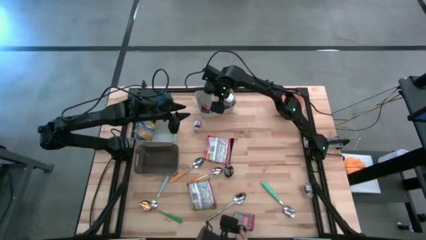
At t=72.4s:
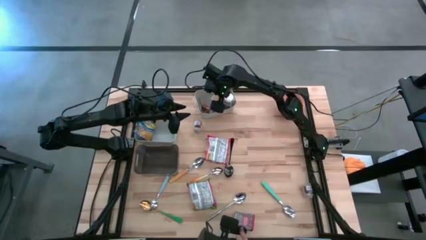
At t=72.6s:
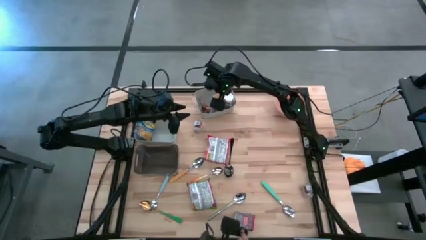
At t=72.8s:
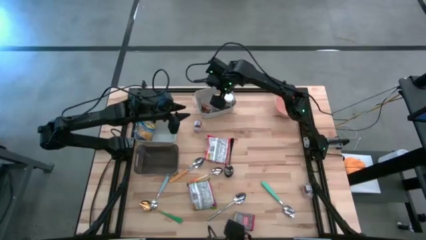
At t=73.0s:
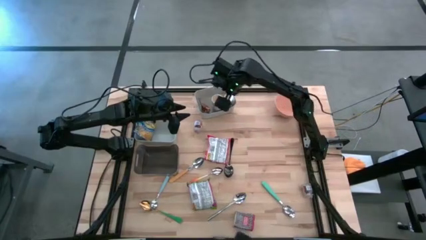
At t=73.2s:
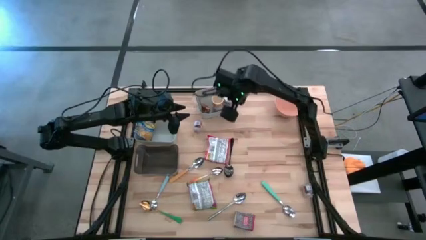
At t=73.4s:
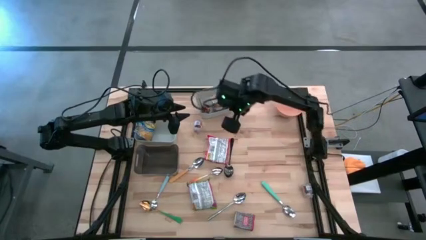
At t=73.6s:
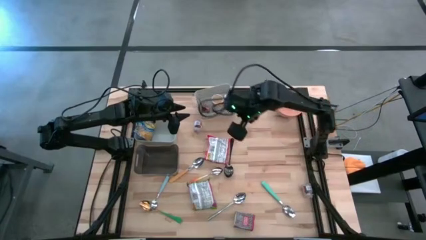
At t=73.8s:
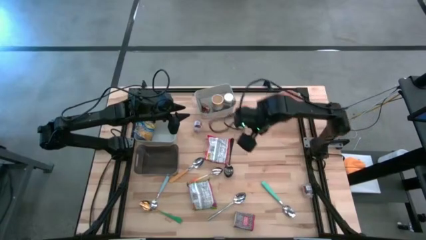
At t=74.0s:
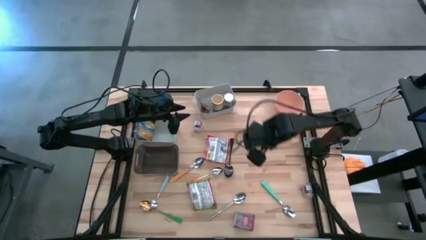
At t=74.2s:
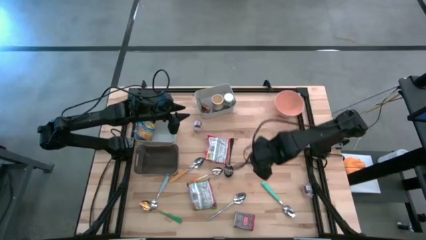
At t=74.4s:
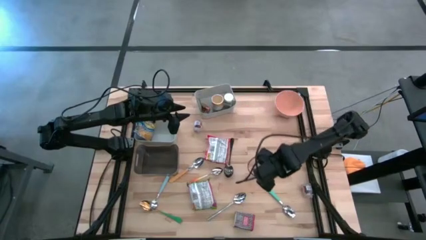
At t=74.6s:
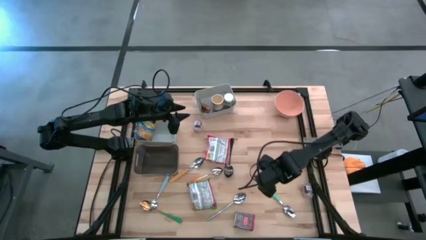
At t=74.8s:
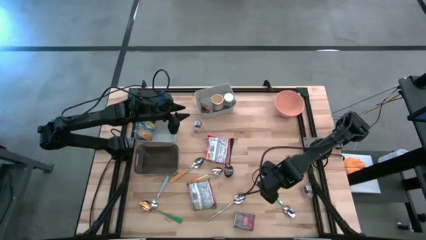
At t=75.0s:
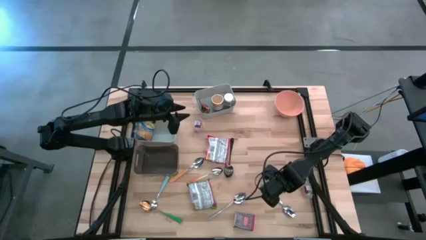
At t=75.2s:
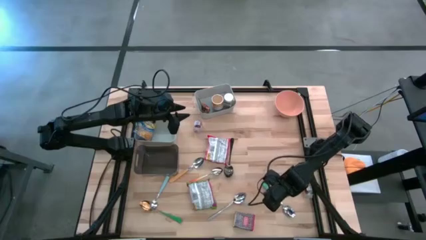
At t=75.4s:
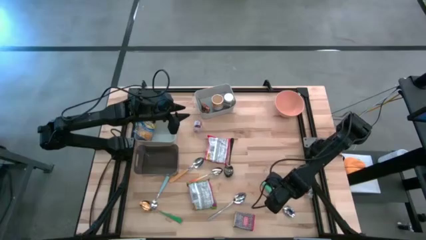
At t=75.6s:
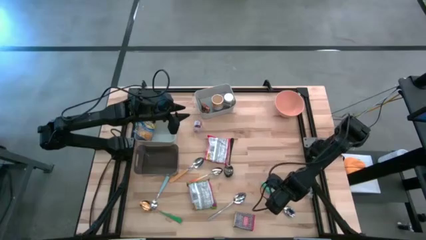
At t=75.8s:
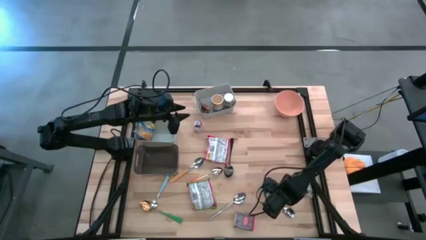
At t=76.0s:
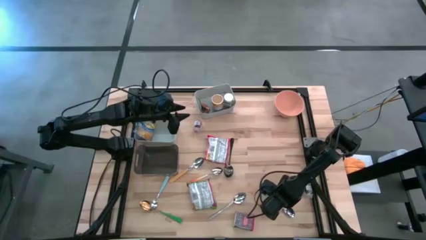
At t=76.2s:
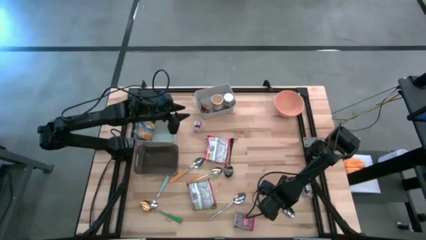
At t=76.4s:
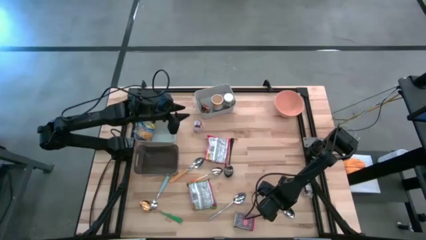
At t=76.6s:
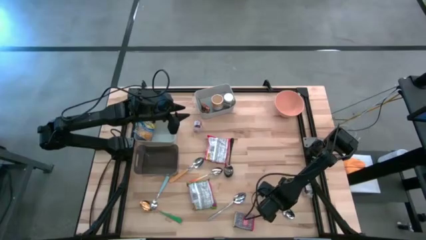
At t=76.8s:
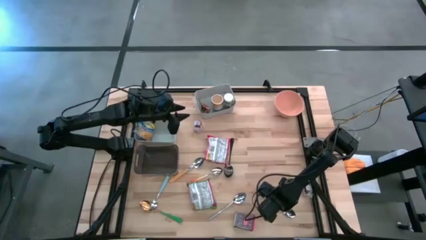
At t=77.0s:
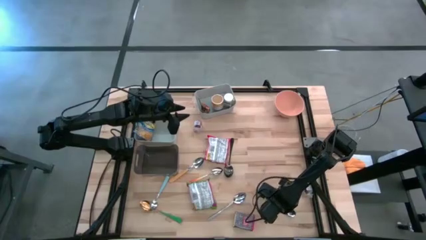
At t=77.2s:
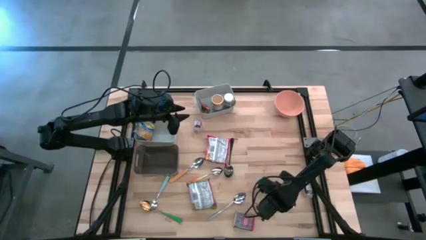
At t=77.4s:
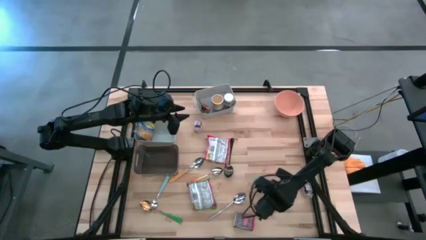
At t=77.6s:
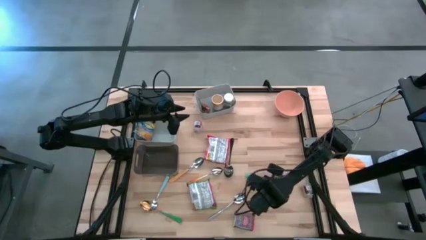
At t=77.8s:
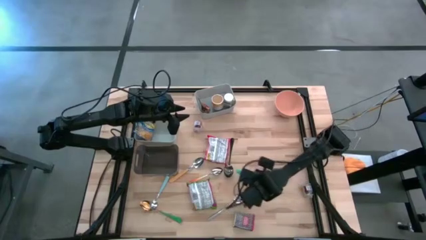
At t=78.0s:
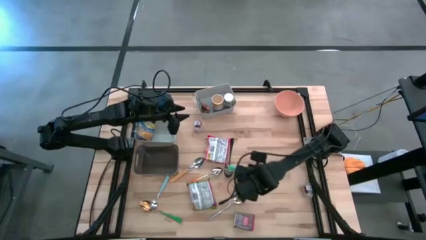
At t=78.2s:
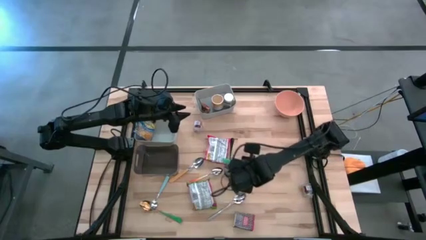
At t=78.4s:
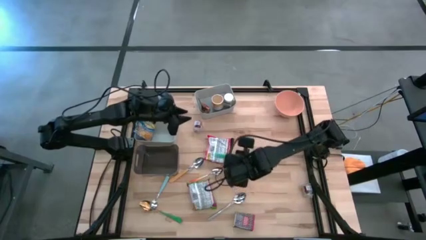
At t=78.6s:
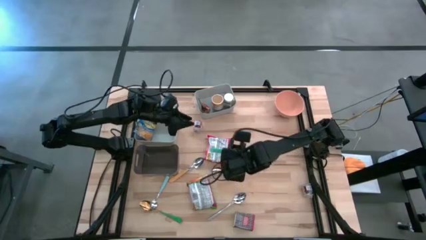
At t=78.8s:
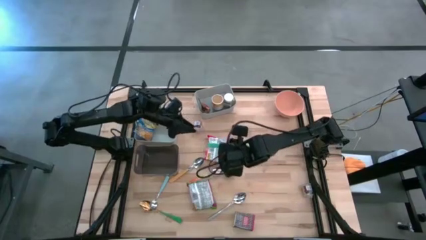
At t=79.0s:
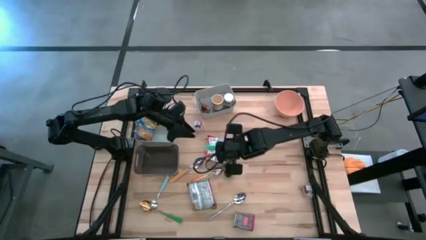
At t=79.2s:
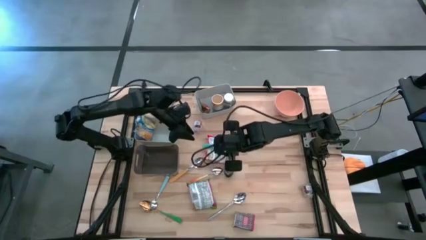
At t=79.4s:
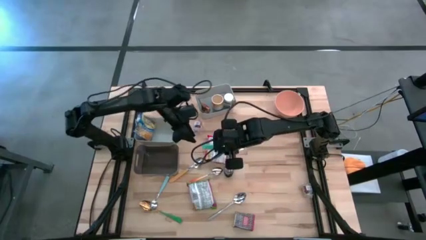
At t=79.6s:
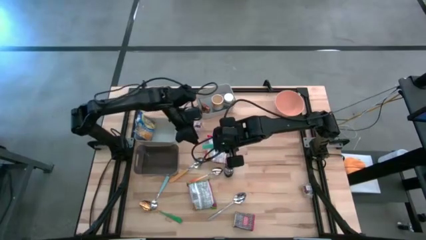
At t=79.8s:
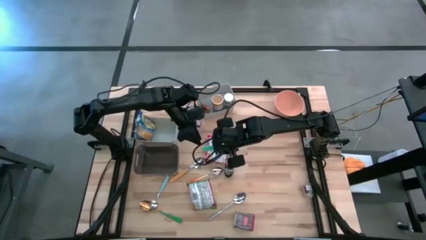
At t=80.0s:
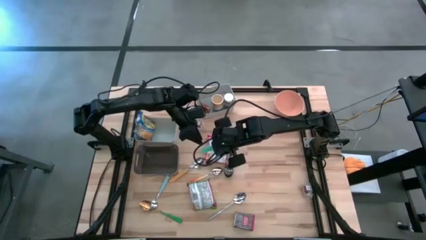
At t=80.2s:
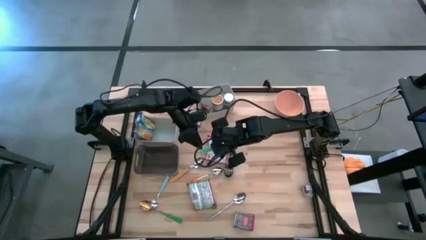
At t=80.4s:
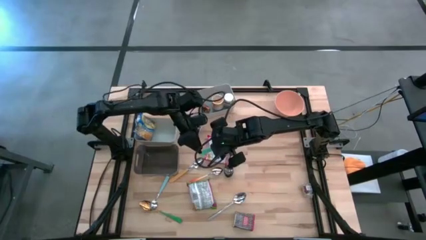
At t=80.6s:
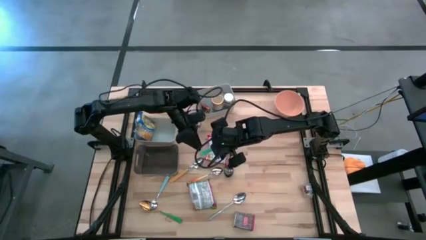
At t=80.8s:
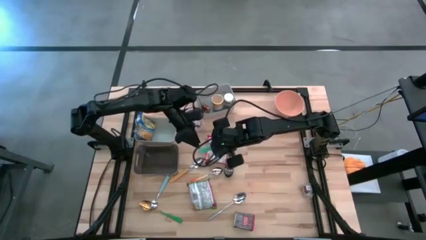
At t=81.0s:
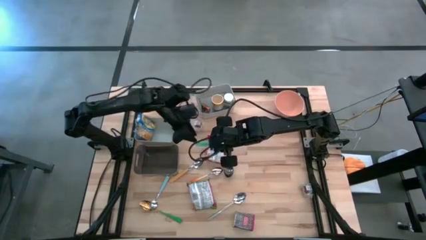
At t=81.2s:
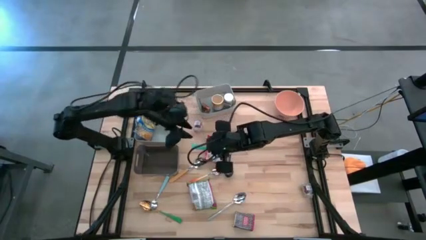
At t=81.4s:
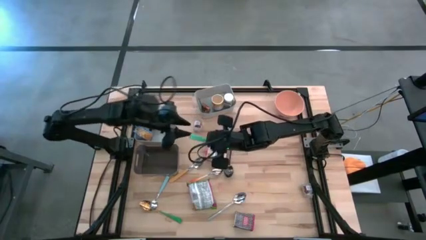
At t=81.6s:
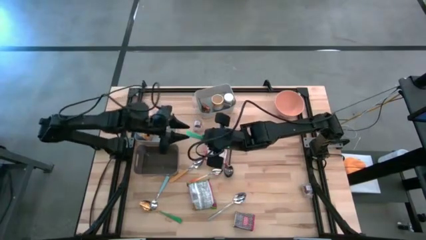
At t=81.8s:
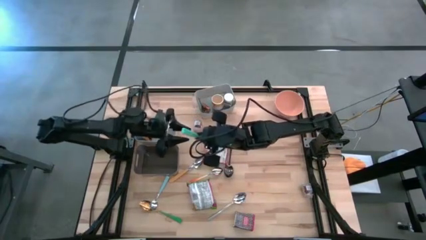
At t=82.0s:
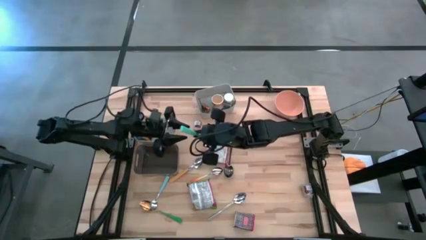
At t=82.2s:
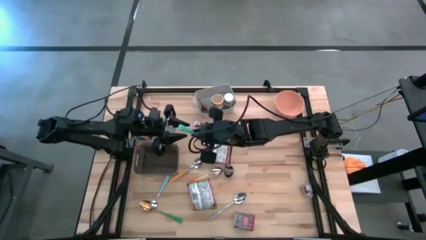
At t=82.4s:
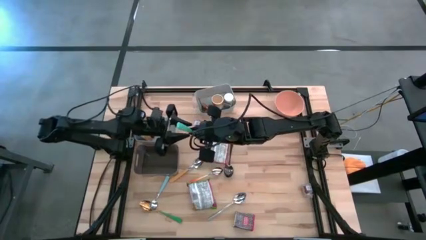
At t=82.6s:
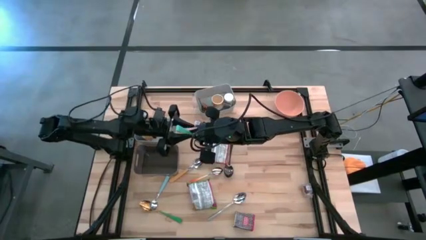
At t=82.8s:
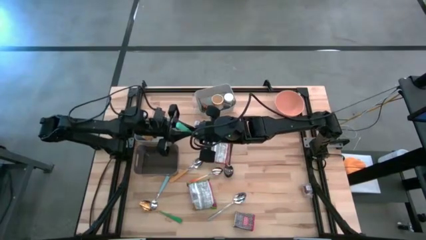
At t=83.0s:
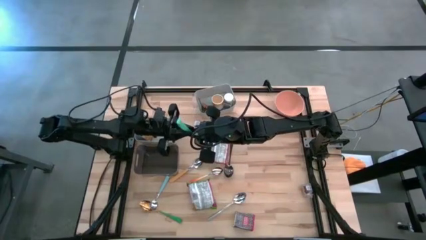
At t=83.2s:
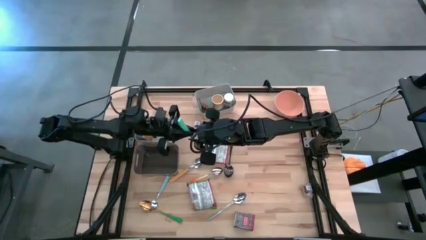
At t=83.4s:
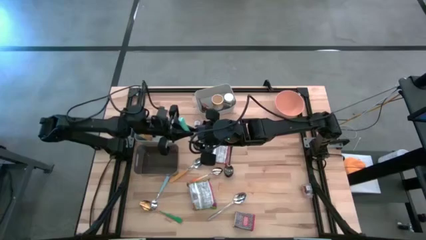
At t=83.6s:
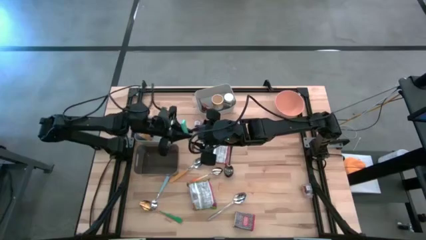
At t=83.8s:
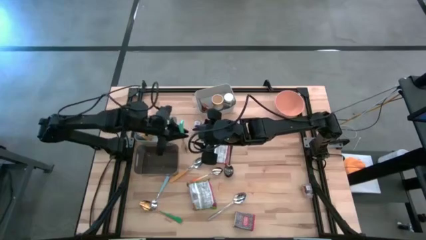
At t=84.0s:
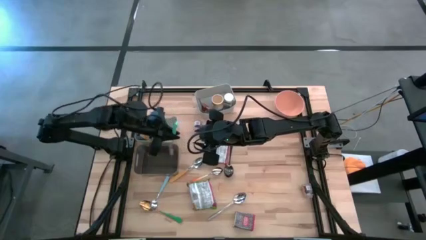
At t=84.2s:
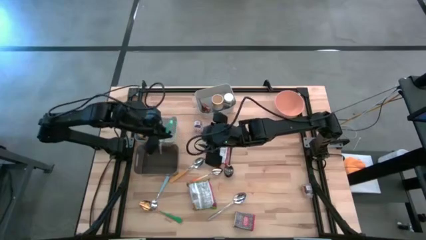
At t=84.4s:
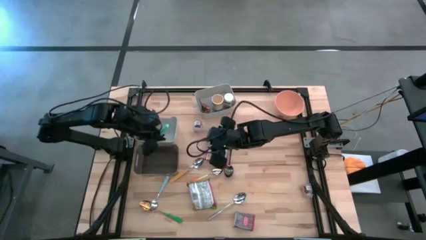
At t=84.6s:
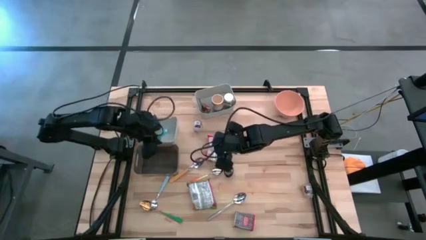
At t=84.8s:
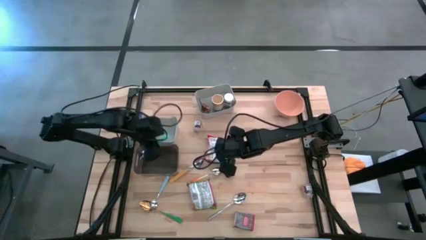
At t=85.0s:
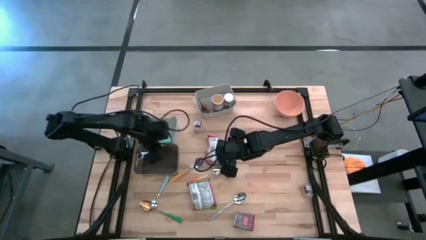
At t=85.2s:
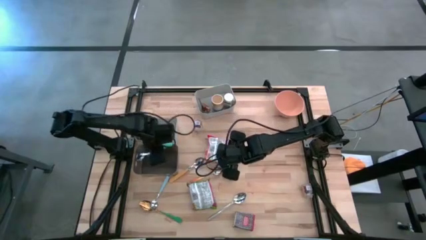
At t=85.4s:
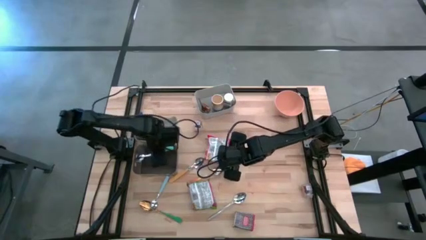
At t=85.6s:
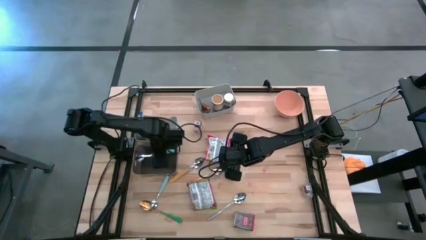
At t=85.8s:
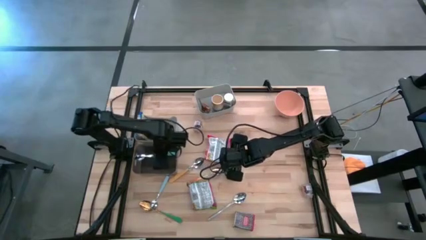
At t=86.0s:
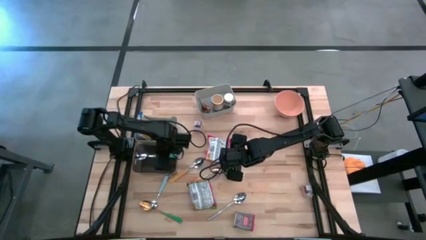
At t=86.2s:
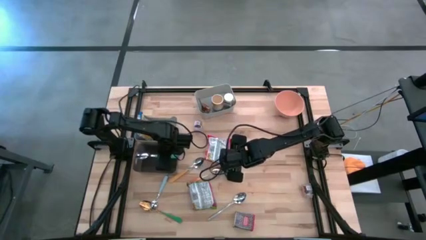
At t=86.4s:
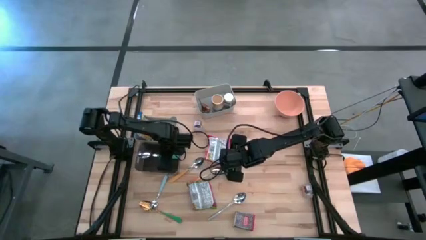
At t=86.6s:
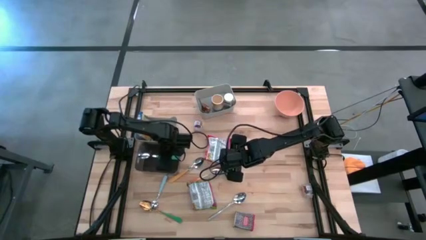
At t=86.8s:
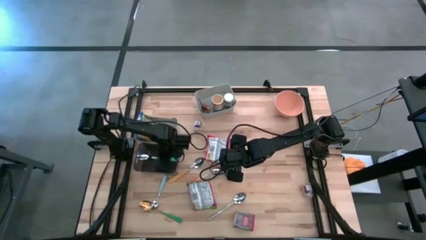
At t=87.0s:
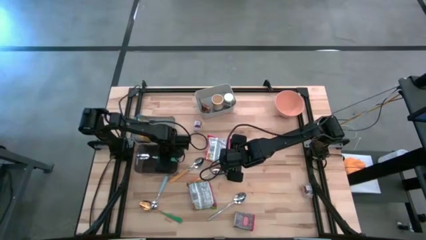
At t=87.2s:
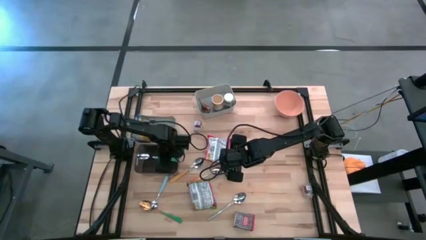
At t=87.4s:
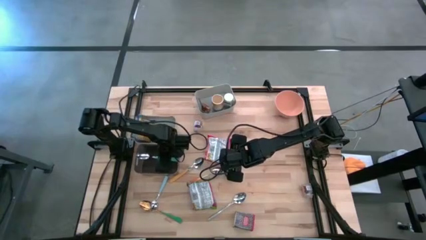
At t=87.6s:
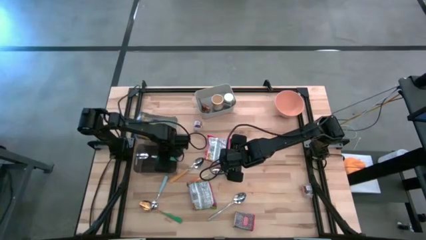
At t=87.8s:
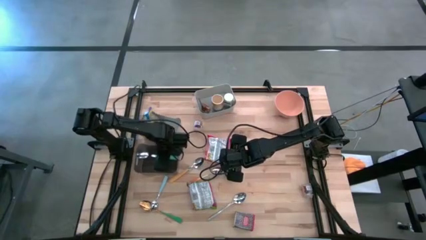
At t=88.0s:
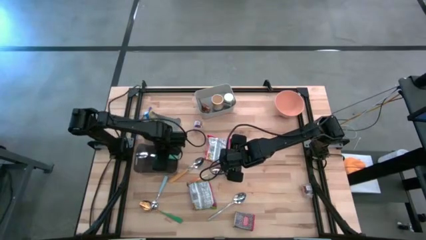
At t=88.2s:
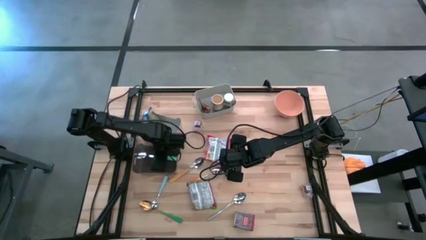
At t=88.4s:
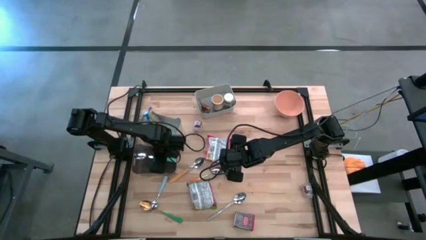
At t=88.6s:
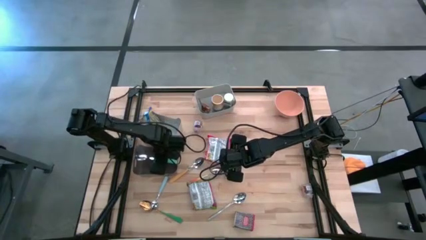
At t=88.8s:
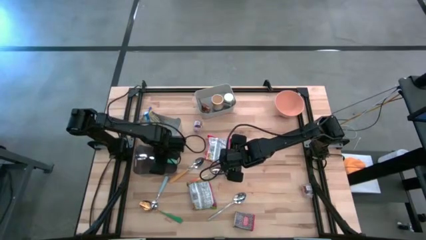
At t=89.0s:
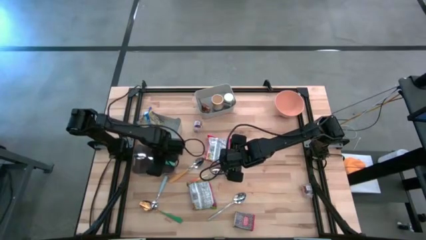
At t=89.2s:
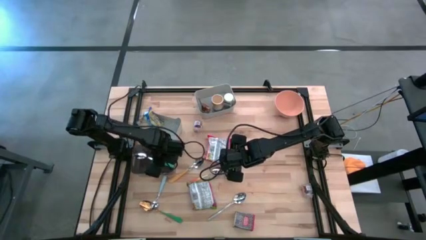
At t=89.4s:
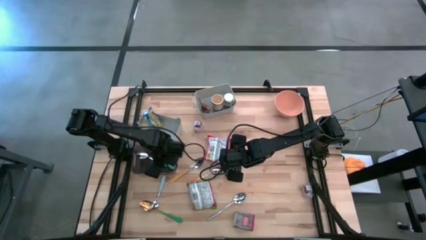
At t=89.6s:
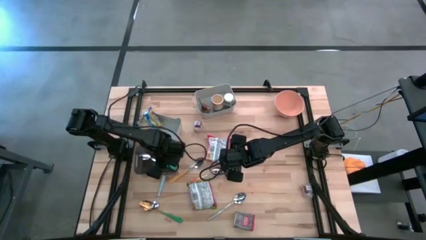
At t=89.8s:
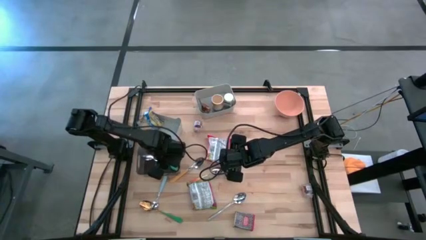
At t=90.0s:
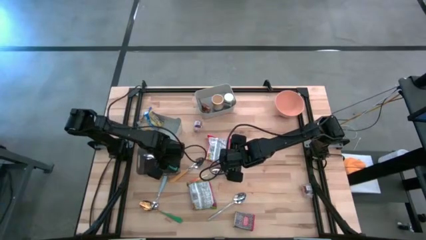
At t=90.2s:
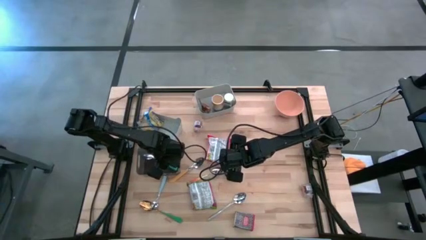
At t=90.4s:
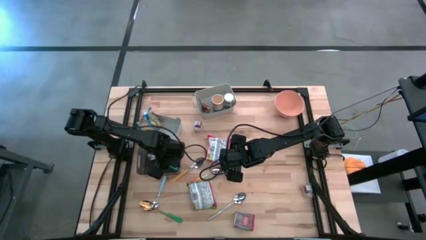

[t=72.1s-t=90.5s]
Put the right blue spoon into the black bin
